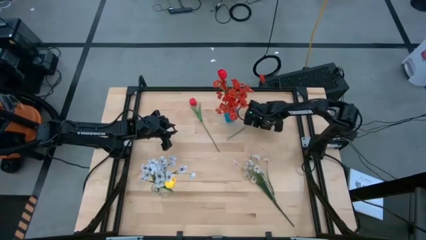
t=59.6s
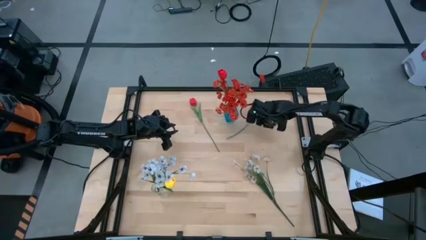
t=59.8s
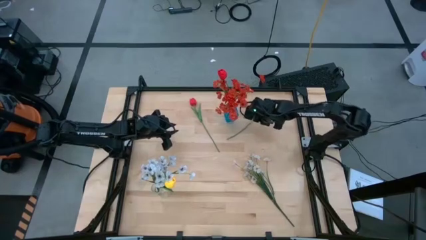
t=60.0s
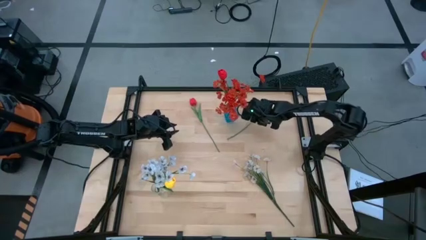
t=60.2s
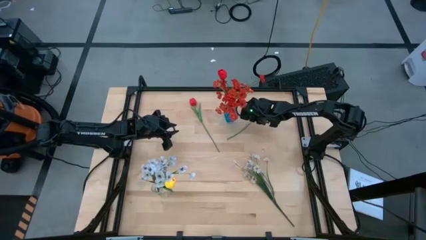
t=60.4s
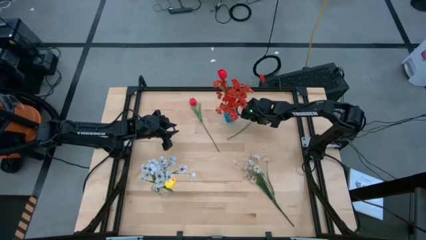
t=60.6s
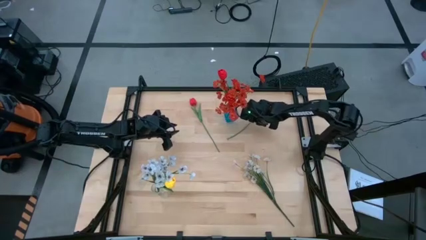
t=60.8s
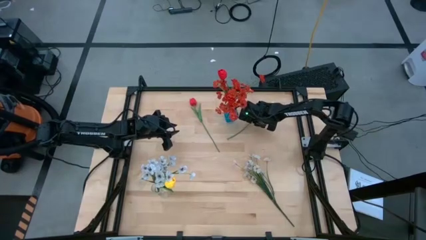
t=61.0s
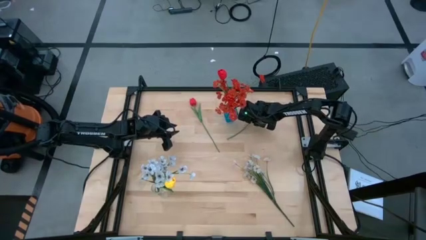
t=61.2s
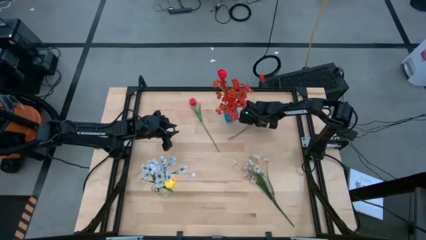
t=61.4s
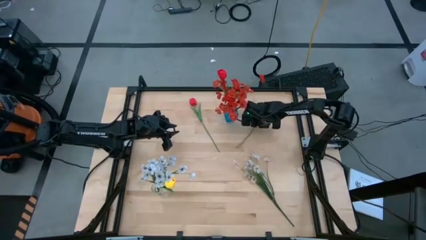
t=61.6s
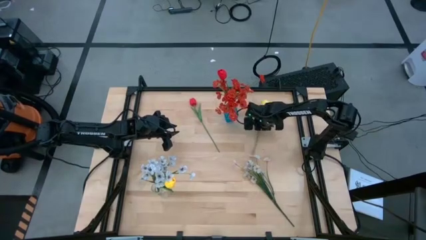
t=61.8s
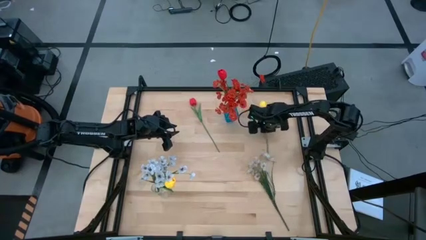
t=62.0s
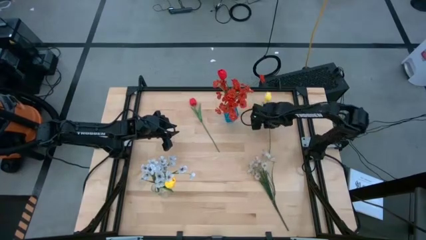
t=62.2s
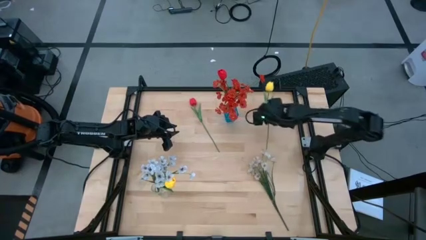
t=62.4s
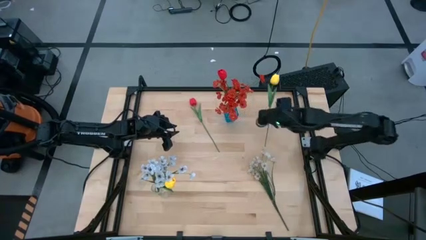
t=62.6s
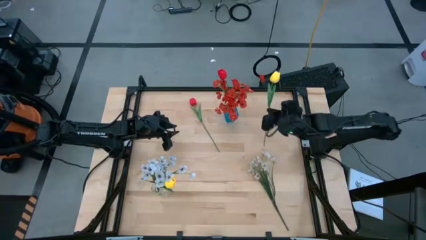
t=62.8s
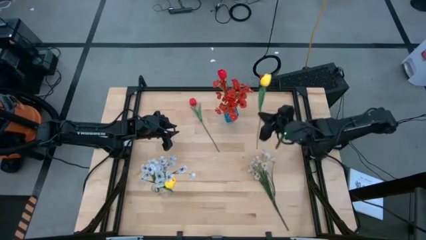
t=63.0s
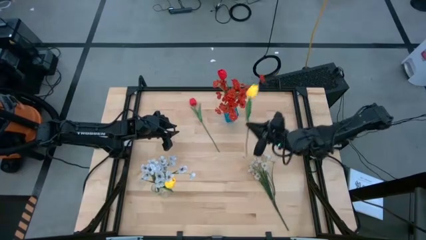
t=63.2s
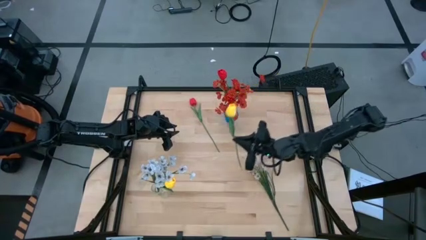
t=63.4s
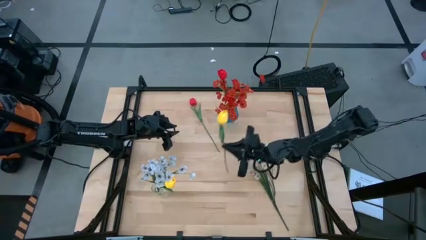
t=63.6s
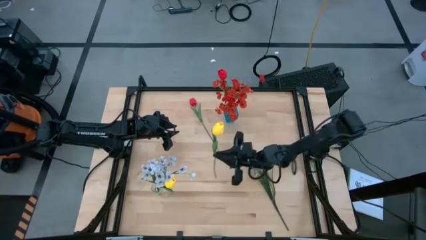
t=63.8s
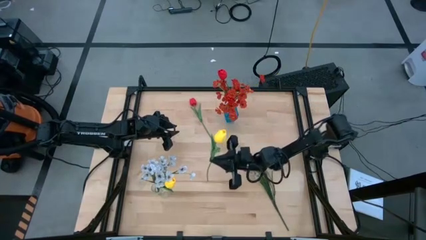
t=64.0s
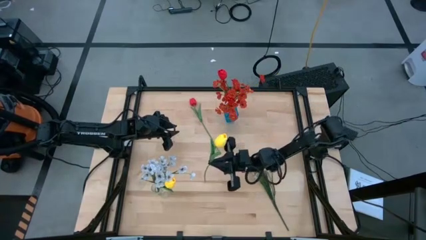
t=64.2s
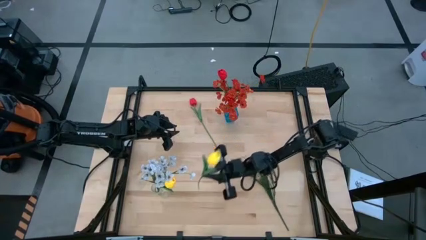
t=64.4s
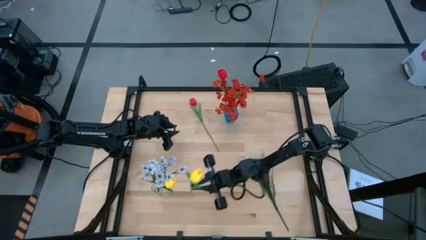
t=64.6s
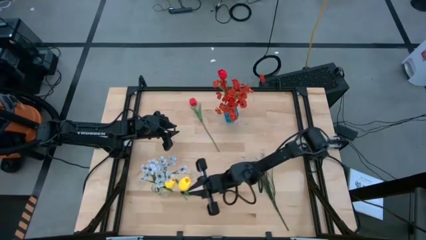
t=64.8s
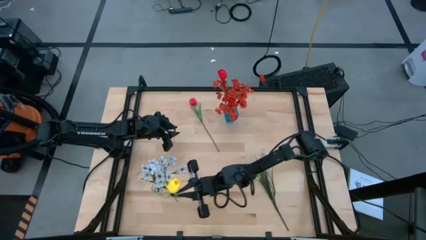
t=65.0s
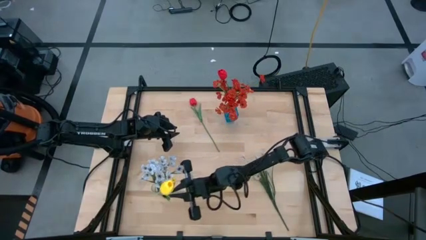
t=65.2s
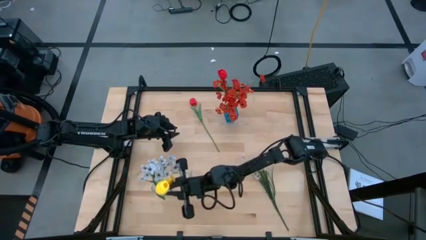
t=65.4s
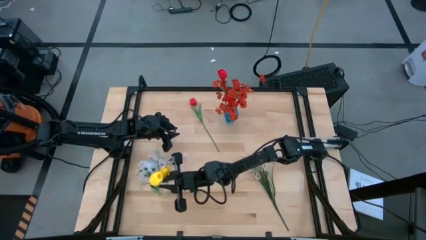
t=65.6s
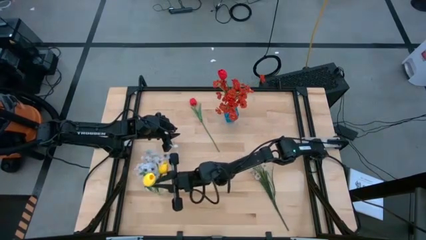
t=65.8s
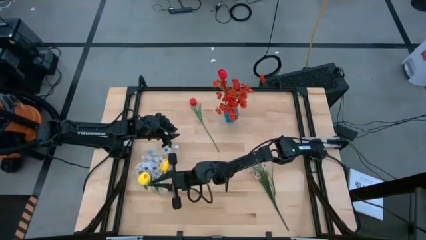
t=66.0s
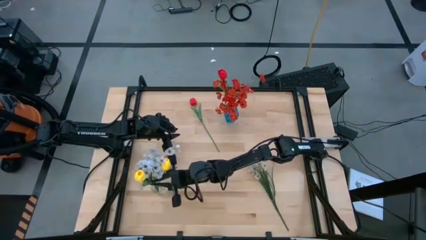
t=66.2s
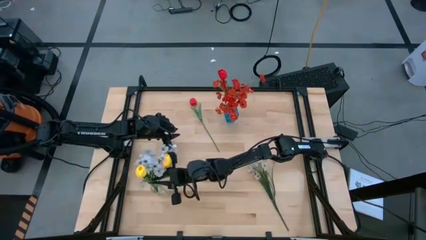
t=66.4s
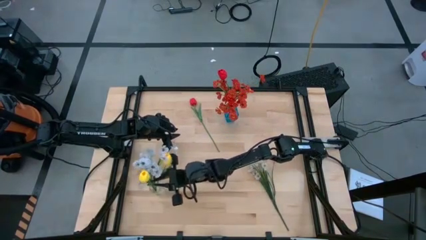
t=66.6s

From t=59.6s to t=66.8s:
Task: Sort flowers into vase by color
Put the yellow flower into the transparent vase

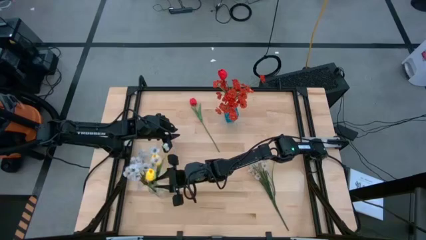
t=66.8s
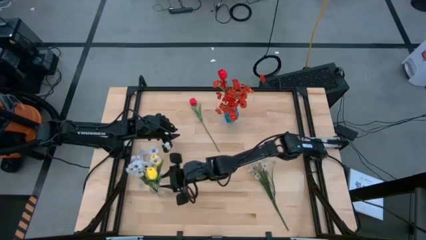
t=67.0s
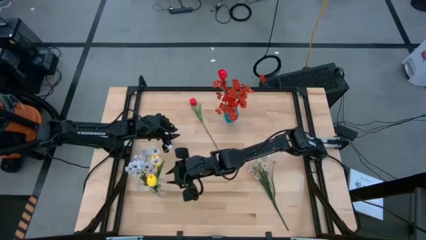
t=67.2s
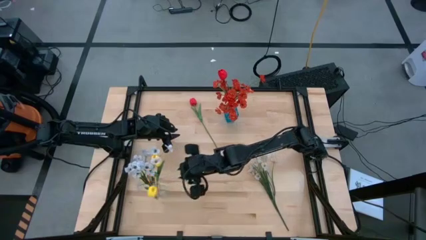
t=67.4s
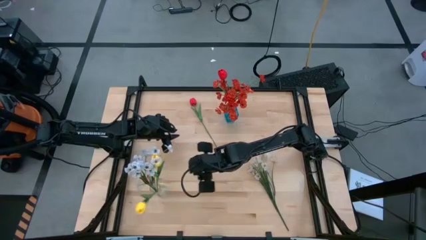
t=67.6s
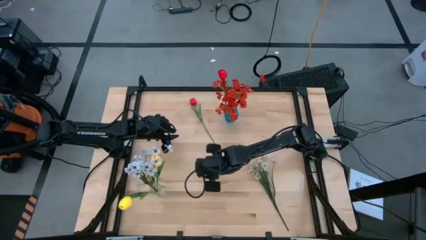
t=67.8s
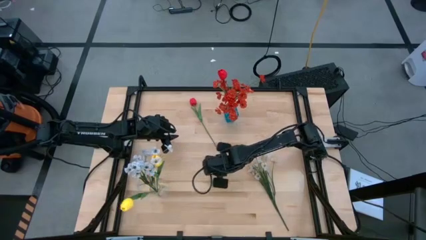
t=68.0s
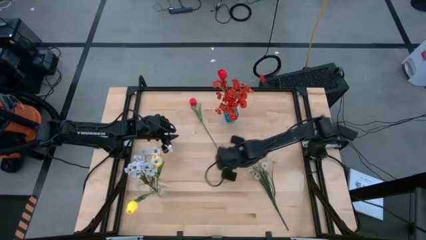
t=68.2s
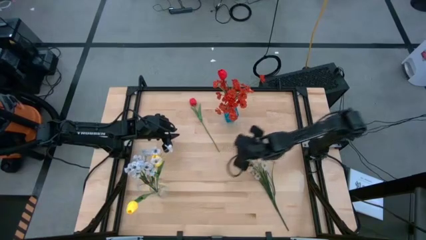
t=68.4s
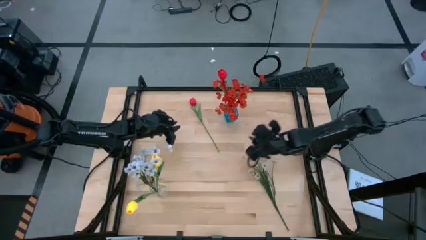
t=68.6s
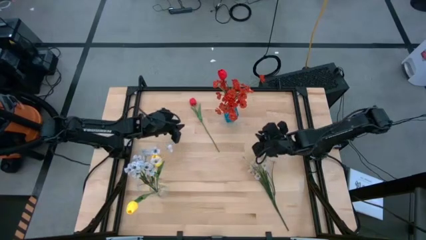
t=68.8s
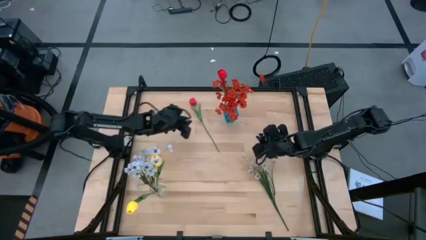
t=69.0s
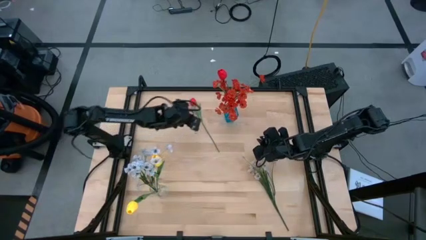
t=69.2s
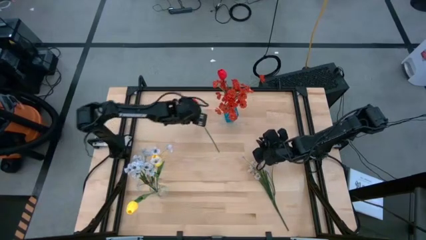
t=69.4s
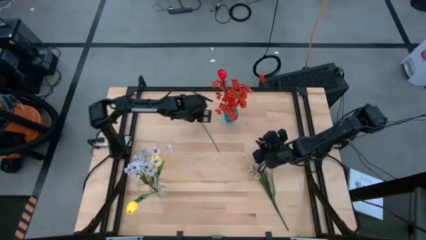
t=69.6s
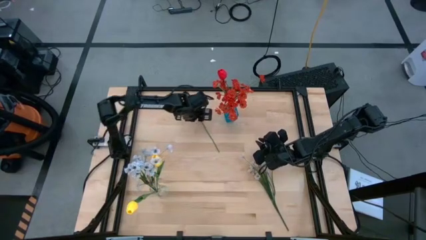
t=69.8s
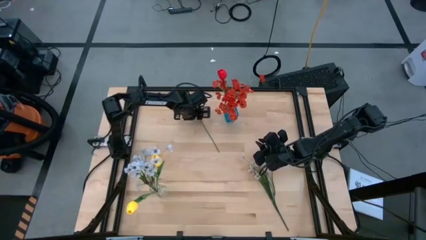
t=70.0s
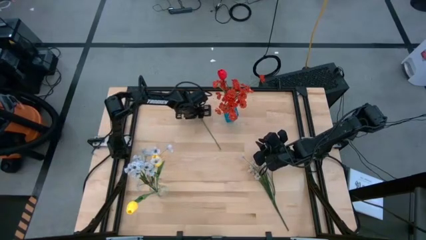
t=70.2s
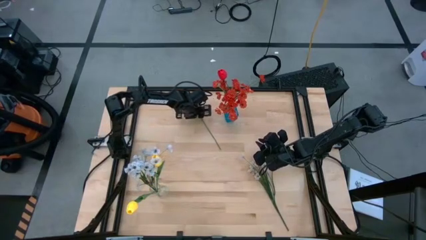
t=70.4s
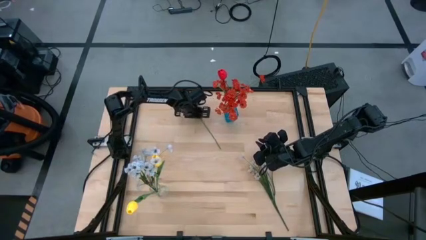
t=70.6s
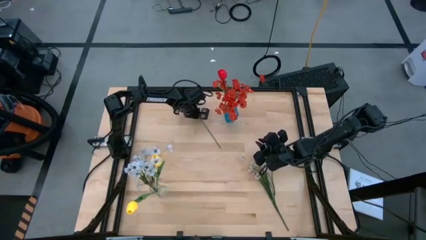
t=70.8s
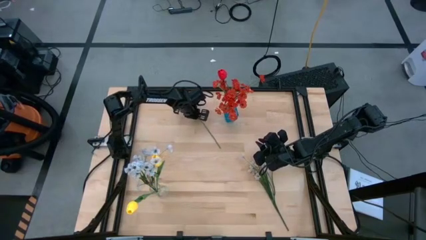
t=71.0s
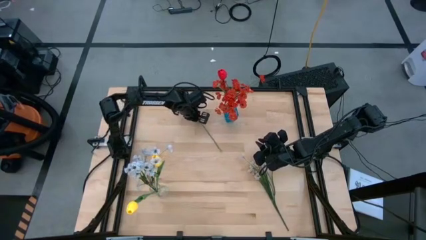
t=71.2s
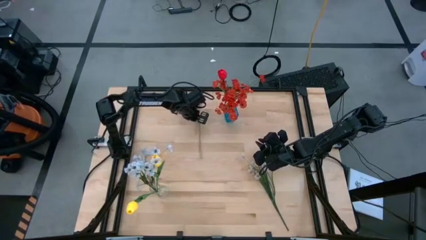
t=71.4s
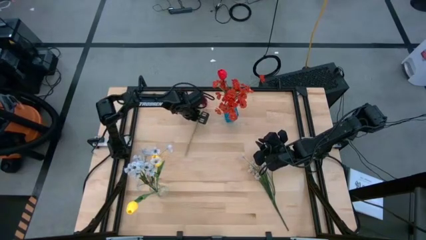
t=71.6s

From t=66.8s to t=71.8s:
Put the red flower into the blue vase

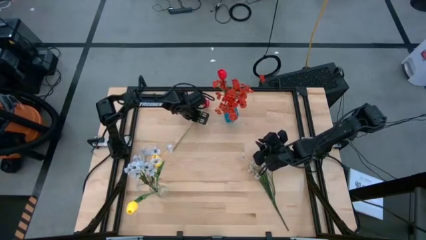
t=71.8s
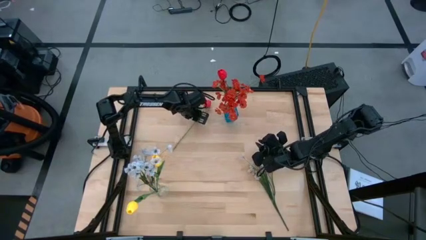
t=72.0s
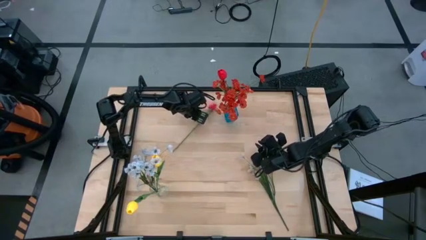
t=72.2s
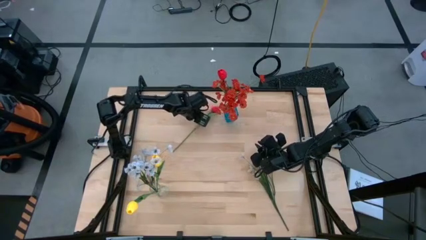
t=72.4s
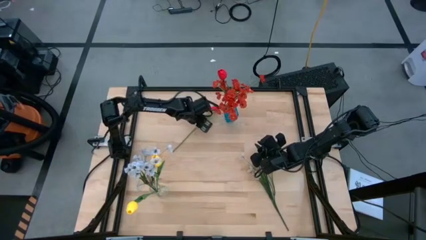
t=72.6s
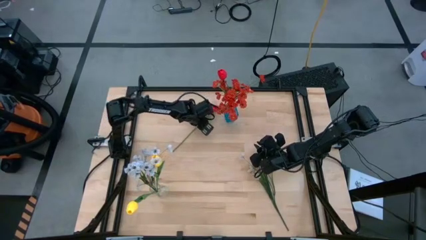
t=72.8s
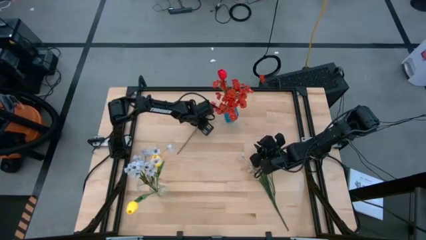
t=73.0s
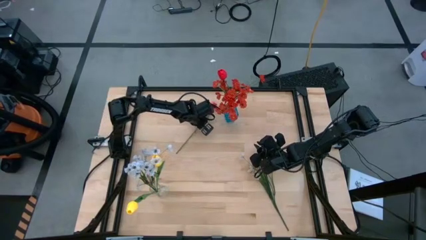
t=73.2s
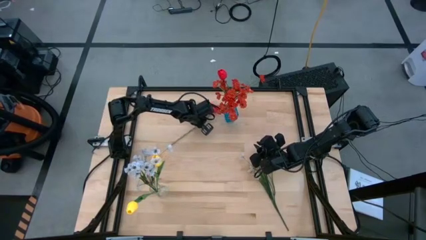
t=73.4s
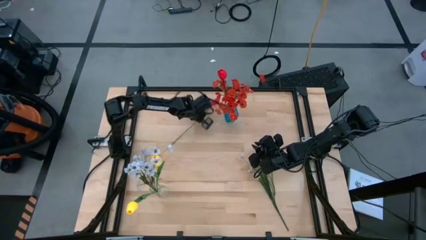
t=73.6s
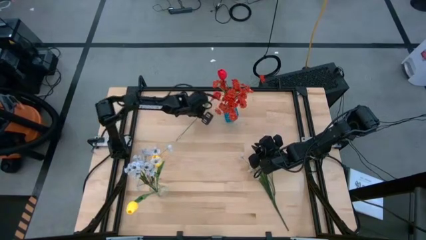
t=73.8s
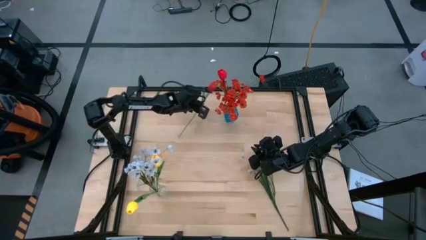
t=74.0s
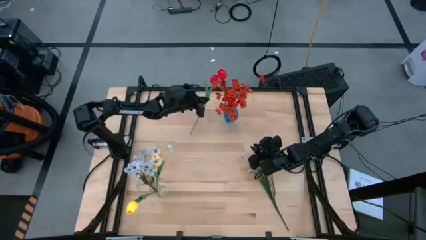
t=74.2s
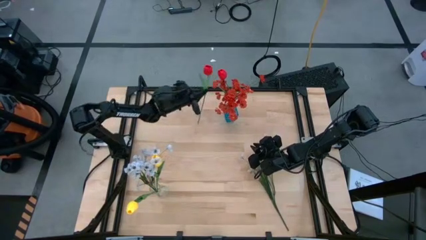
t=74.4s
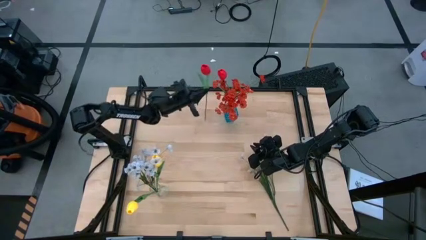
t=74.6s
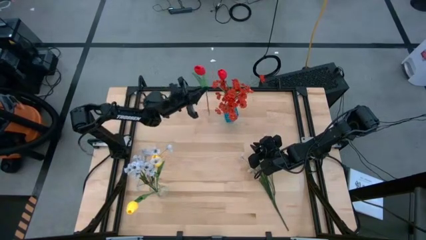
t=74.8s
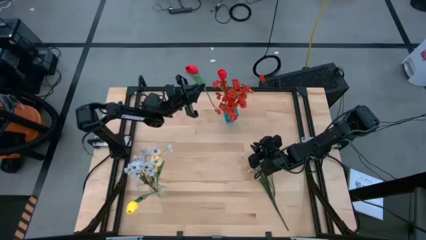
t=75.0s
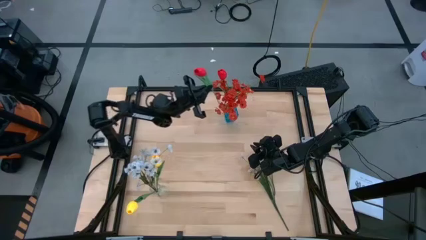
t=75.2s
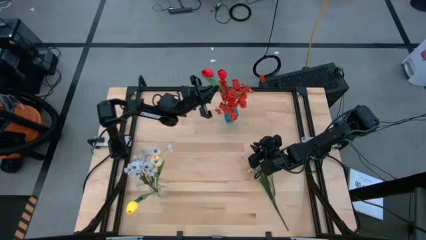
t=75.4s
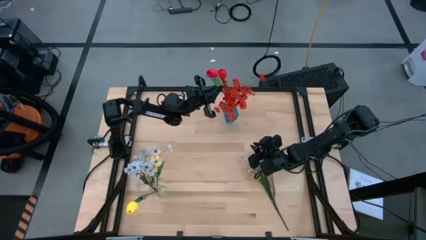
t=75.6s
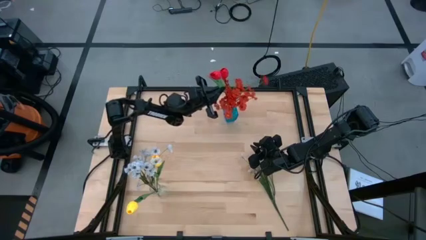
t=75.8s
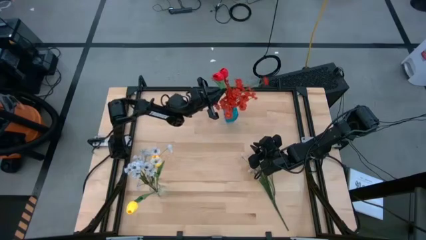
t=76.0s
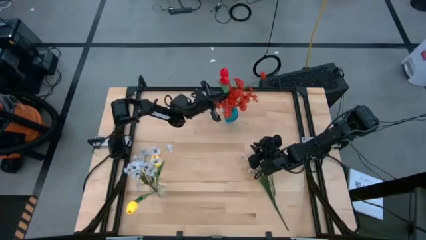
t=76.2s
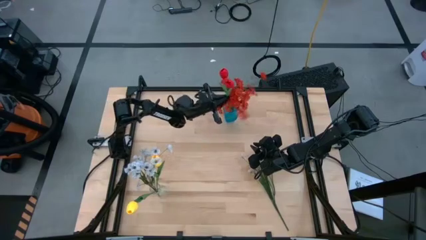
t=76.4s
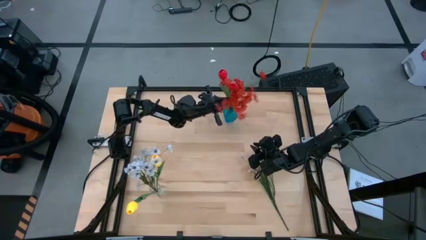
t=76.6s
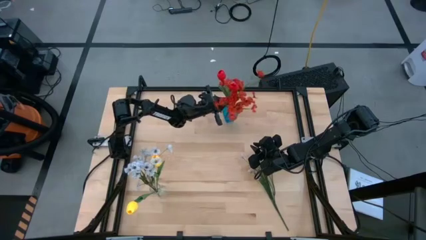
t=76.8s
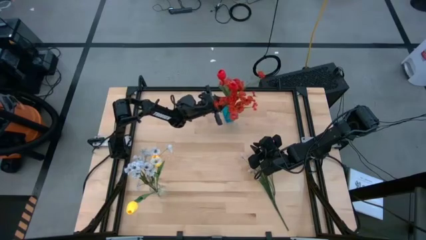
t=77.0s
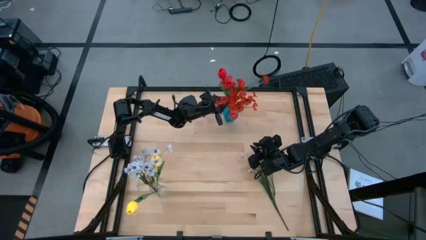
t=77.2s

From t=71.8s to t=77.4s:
Put the red flower into the blue vase
